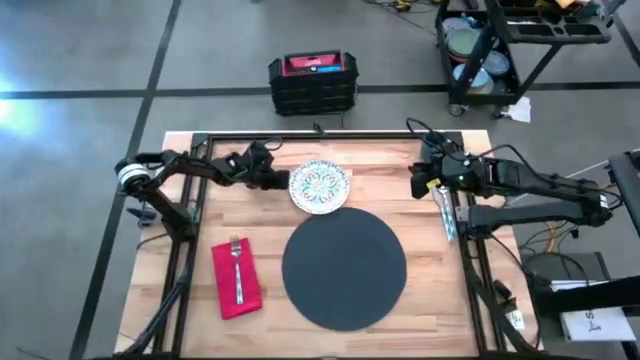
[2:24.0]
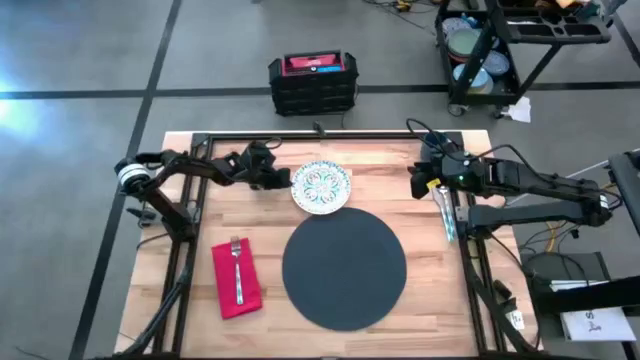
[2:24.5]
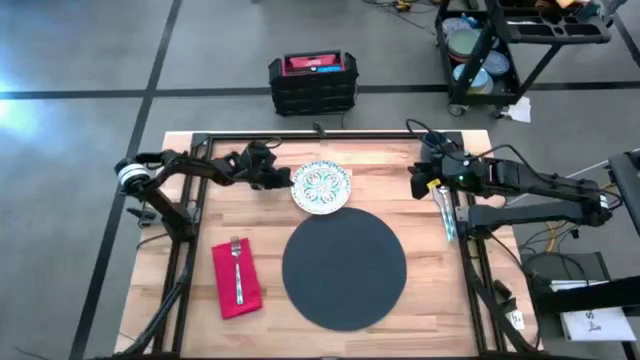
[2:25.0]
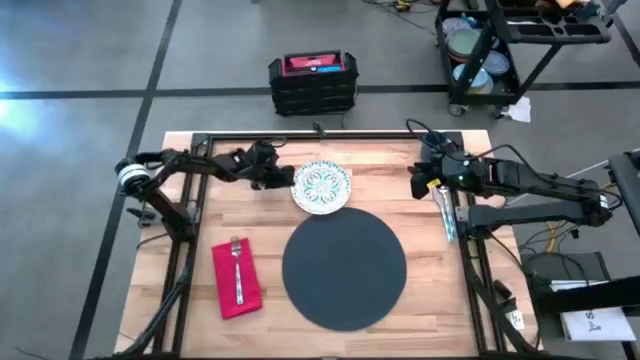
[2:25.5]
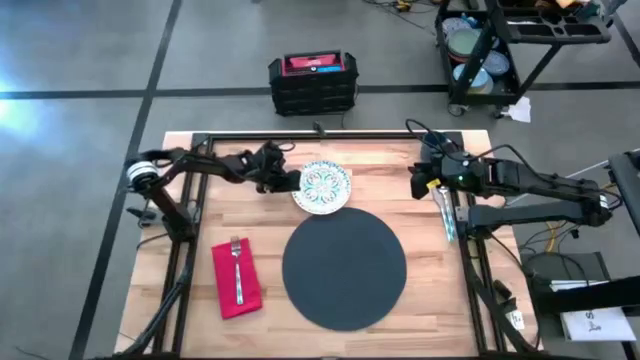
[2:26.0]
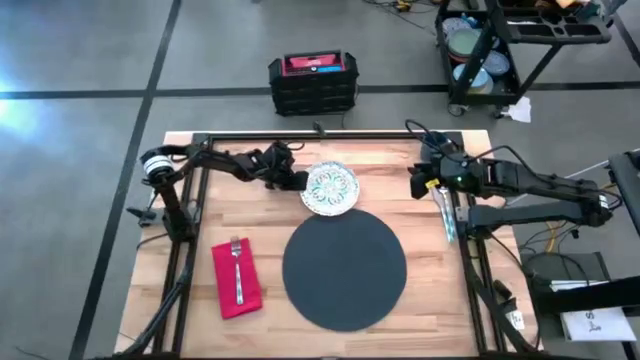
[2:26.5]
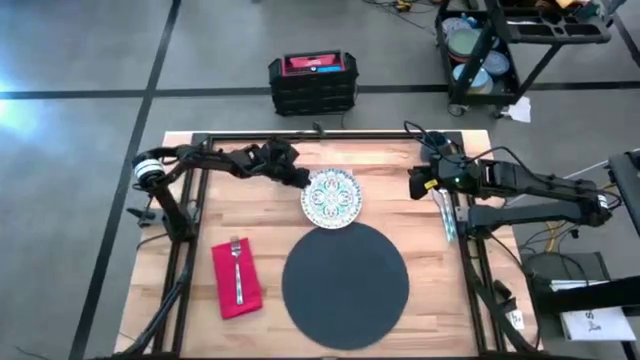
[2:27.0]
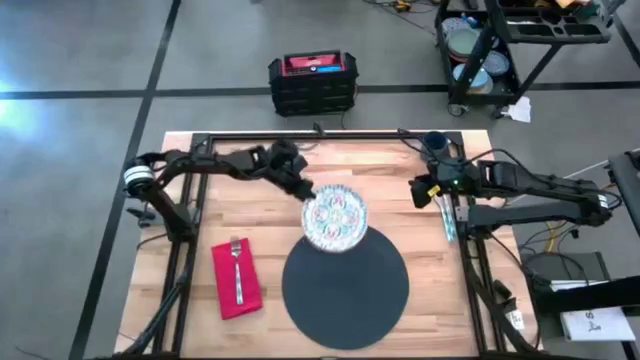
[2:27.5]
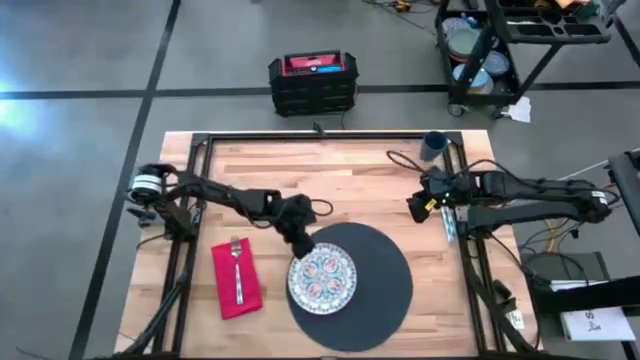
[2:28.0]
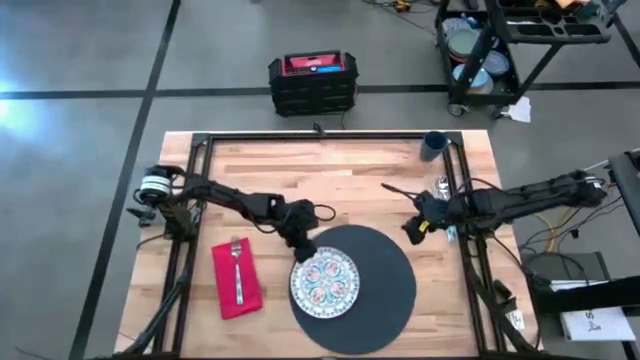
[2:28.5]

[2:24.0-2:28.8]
Task: Set table place
Put the blue patterned plate on the black placemat

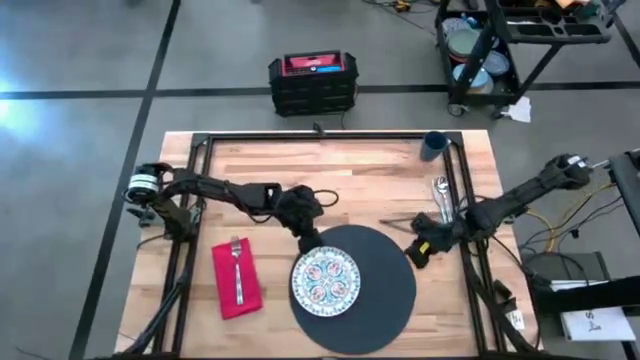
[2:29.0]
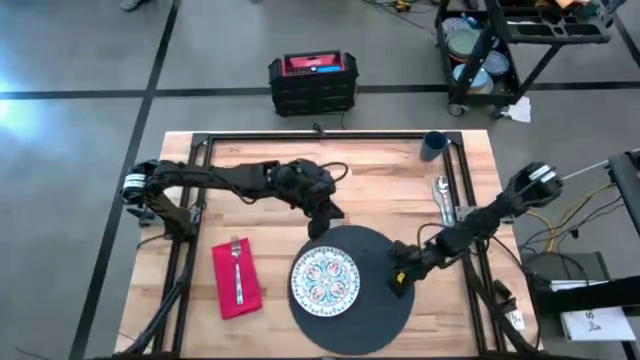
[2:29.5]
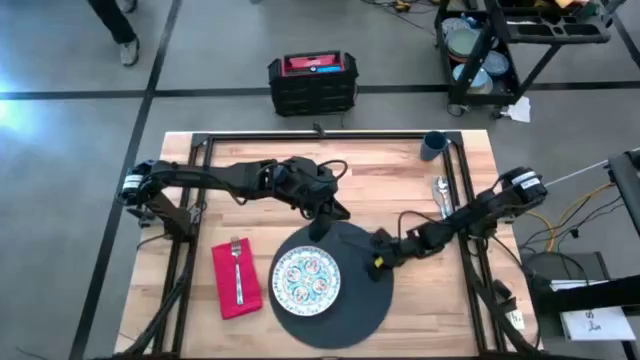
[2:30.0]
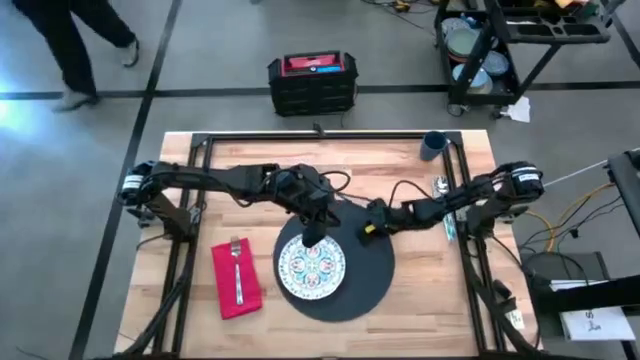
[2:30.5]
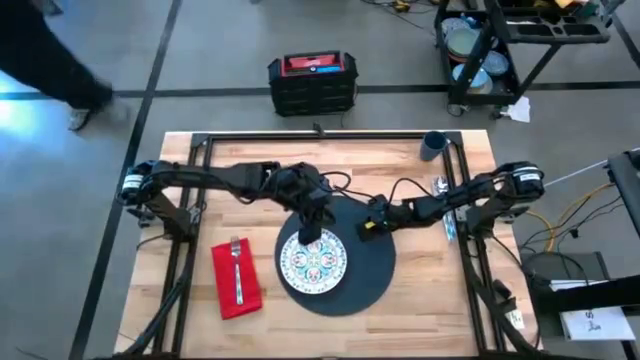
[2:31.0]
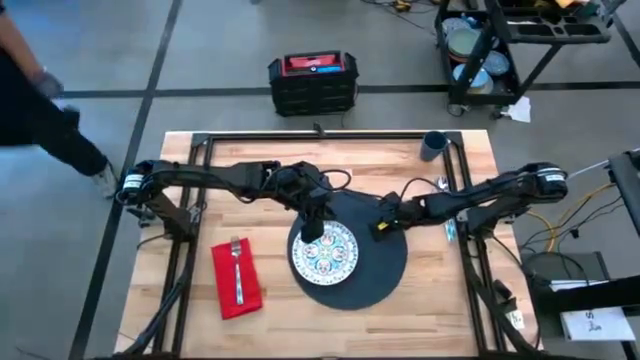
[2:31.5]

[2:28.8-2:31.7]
Adjust the black placemat at the center of the table

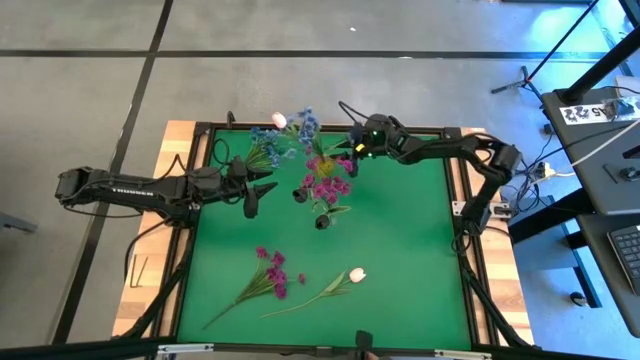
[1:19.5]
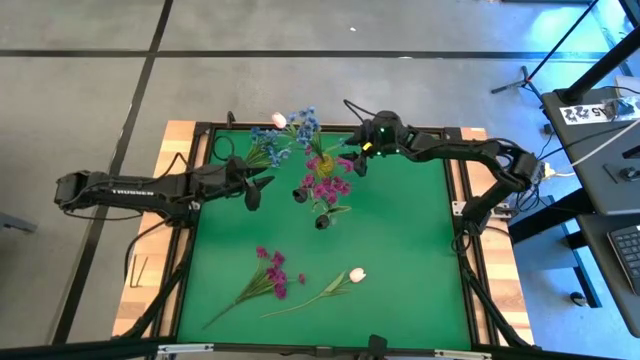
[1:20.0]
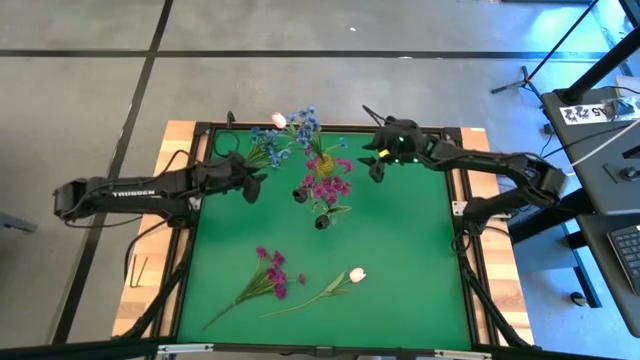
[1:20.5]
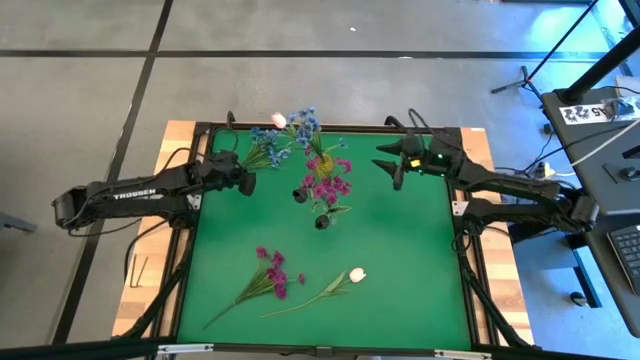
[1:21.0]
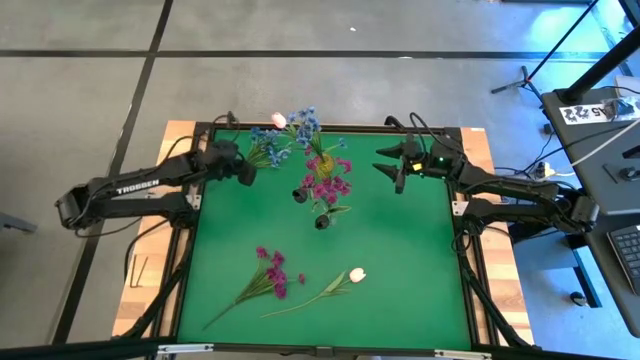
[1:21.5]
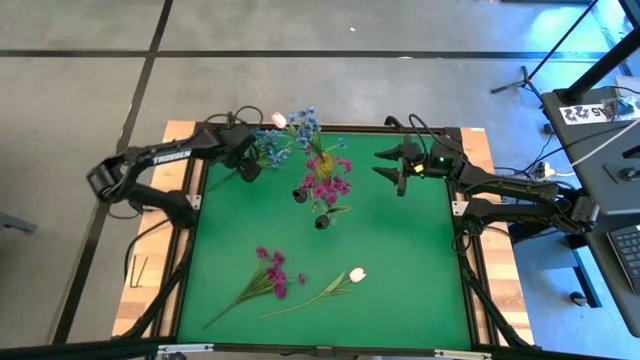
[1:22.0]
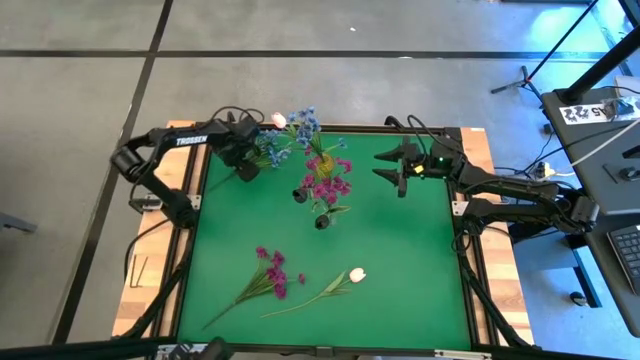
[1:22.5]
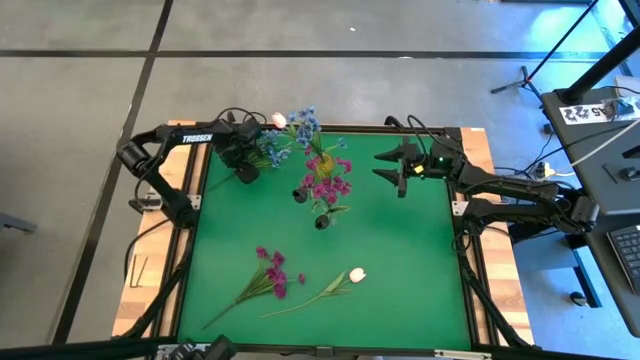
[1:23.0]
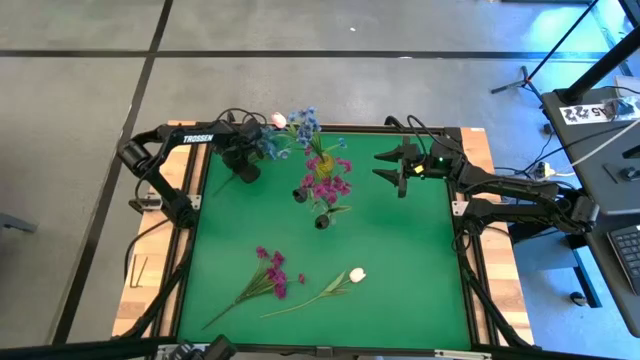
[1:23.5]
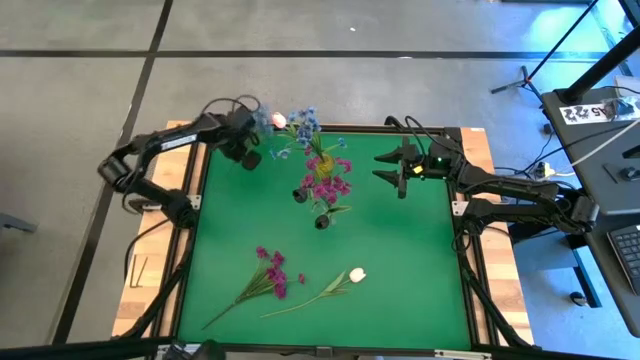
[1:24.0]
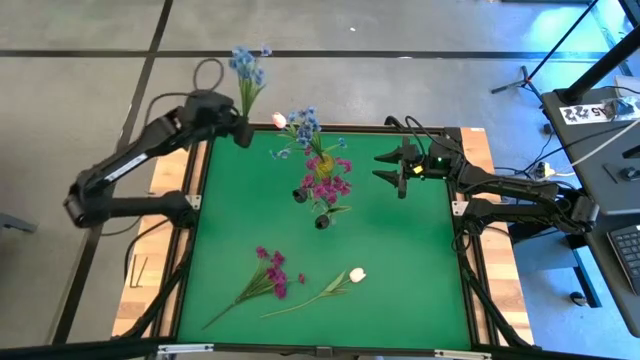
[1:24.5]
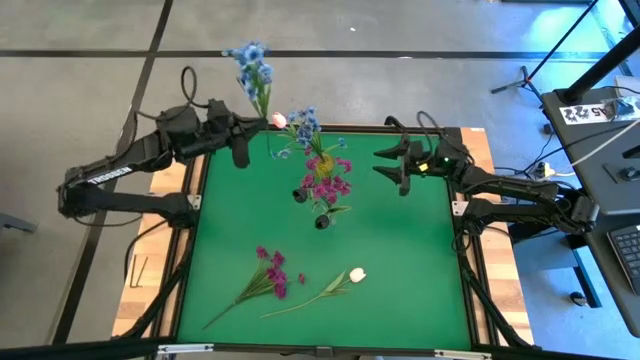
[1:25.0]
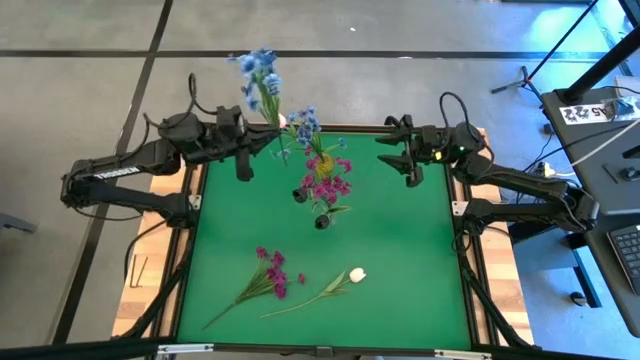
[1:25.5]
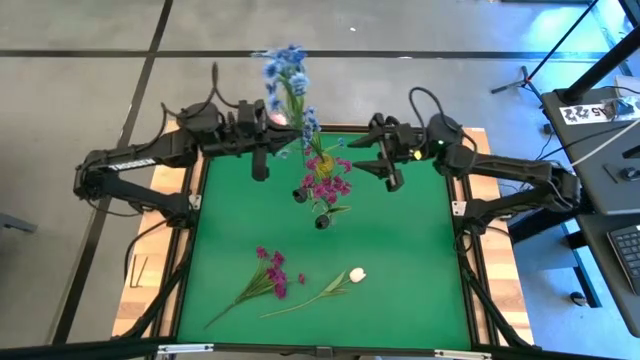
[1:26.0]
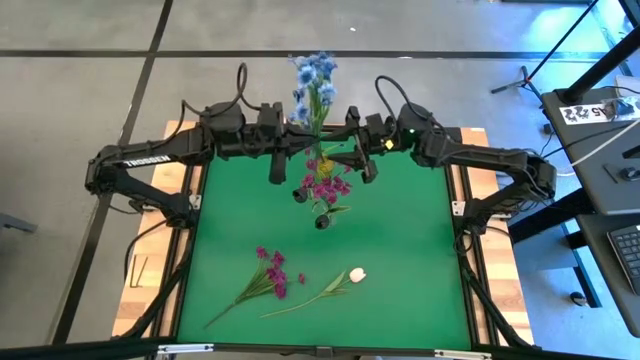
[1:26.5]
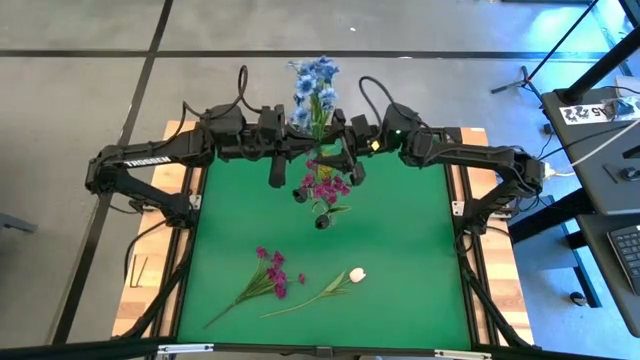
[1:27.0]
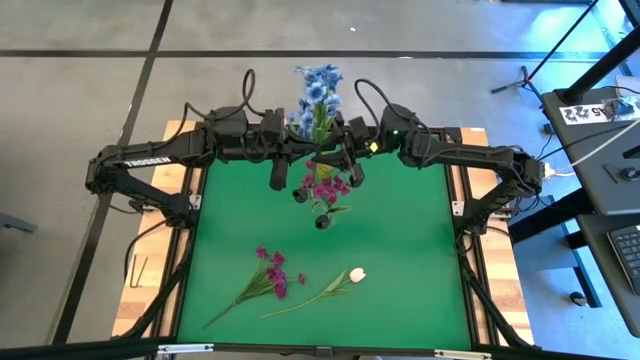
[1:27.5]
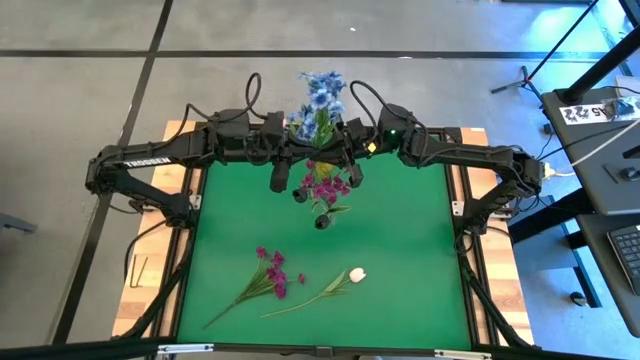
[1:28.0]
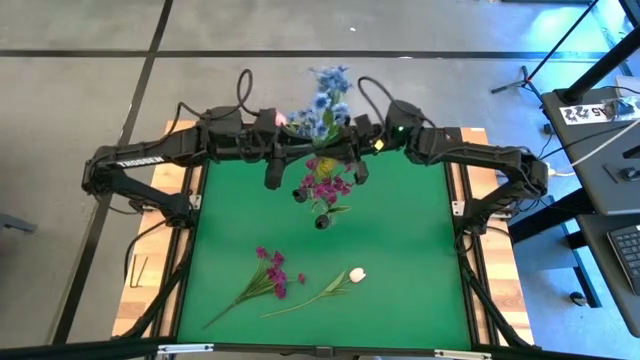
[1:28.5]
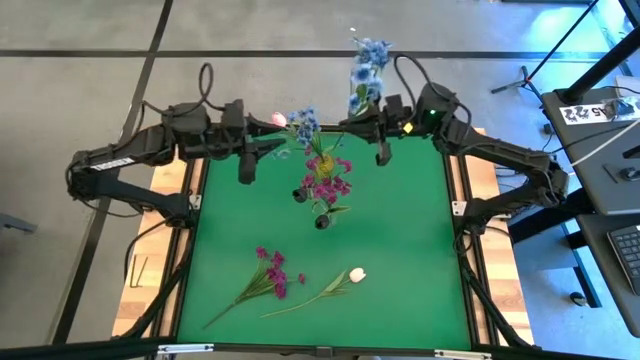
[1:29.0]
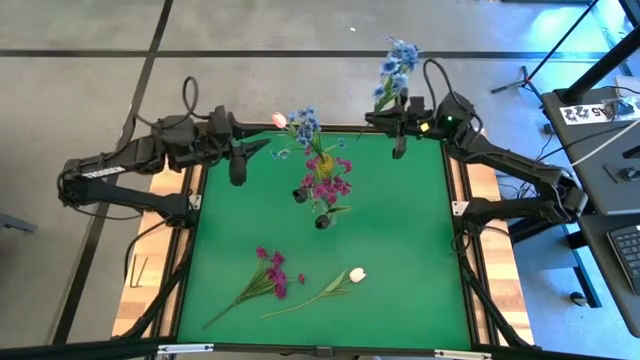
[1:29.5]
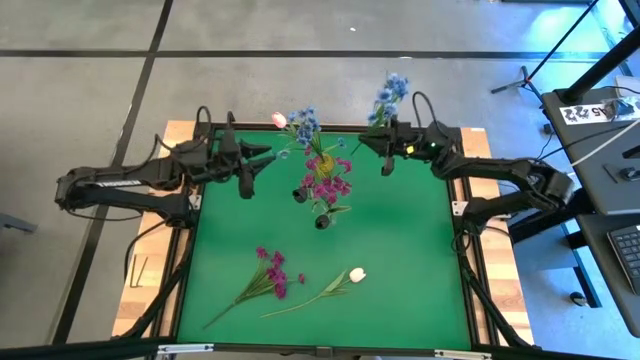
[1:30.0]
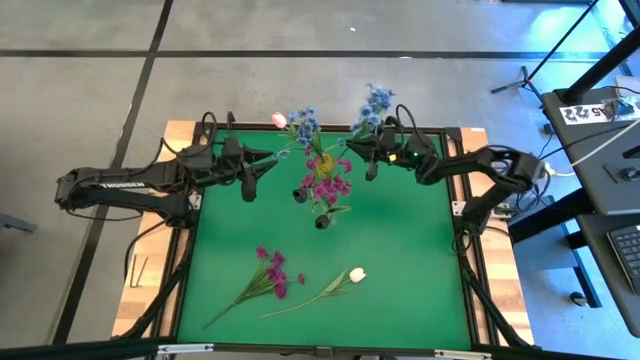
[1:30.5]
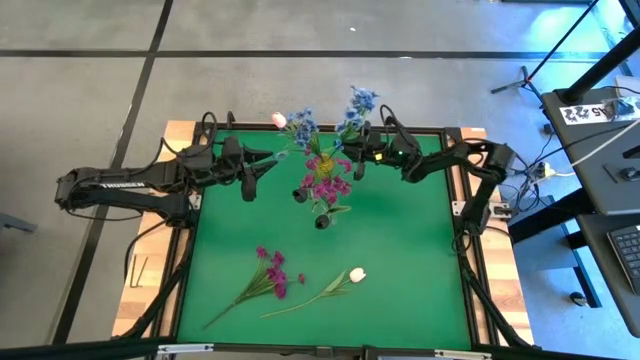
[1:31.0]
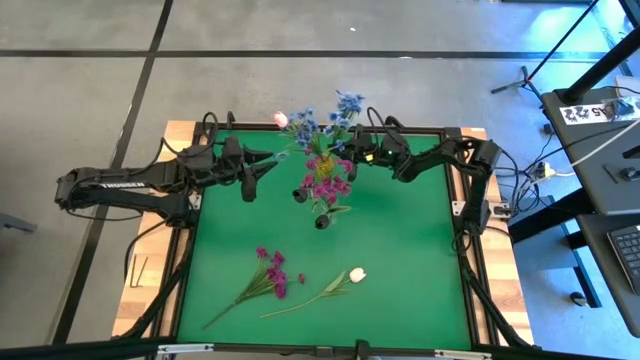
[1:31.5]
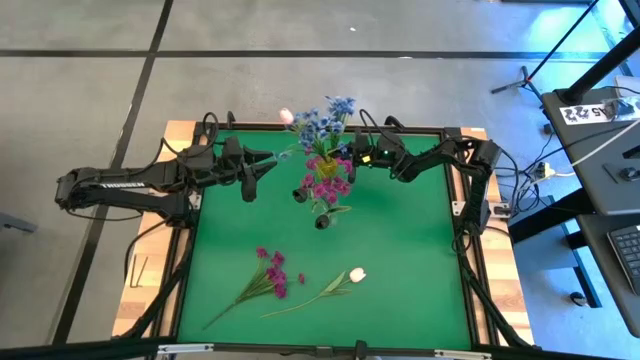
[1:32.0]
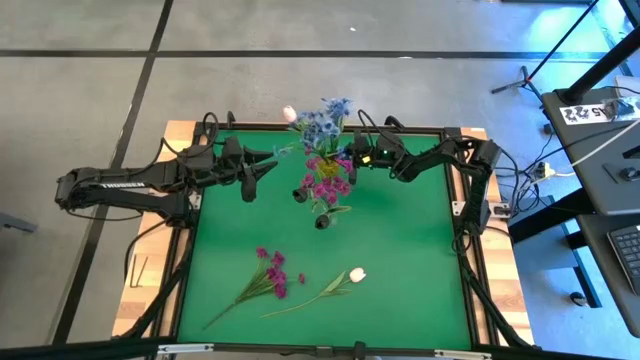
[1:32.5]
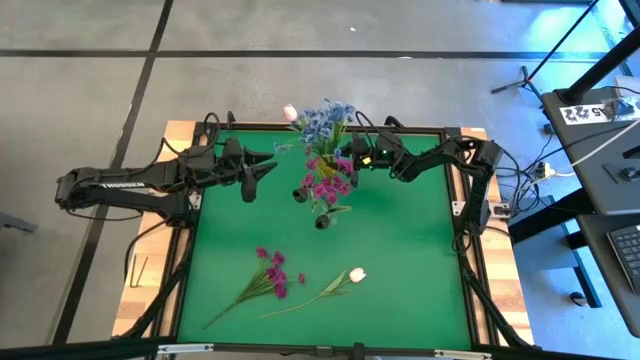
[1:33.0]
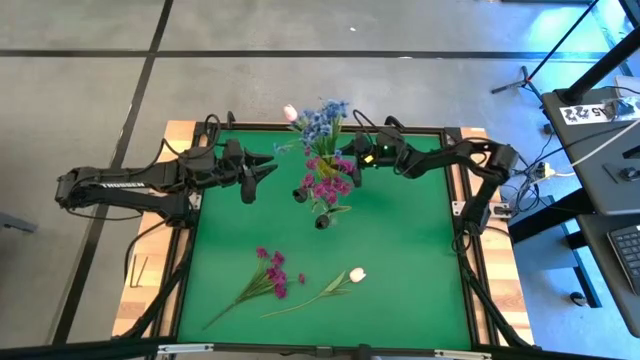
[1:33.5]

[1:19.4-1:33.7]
Task: Sort flowers into vase by color
Put the blue flowers into the yellow vase
